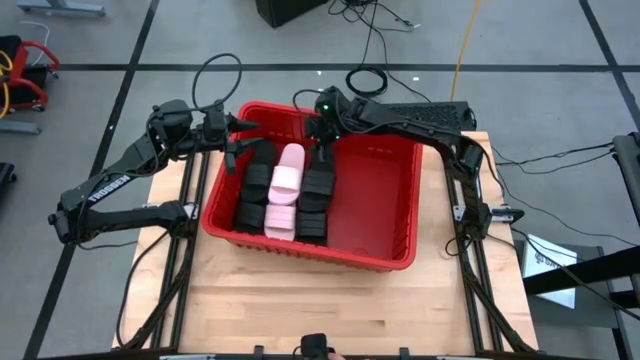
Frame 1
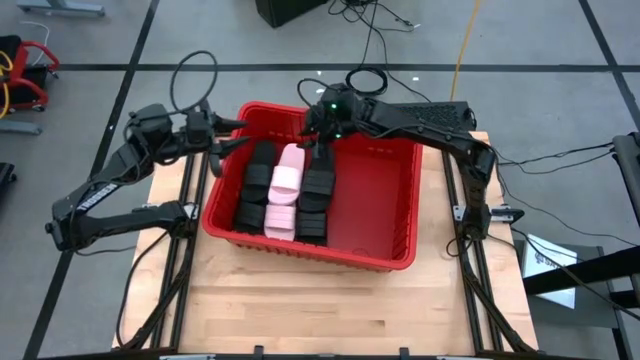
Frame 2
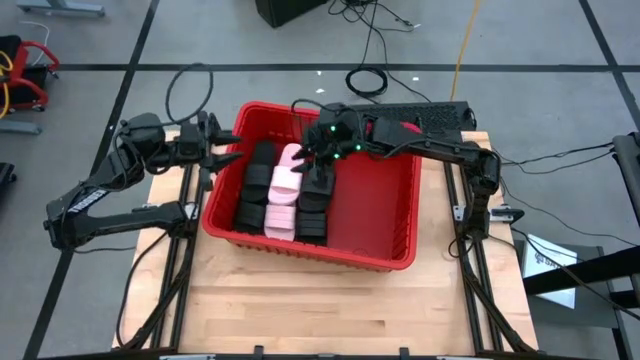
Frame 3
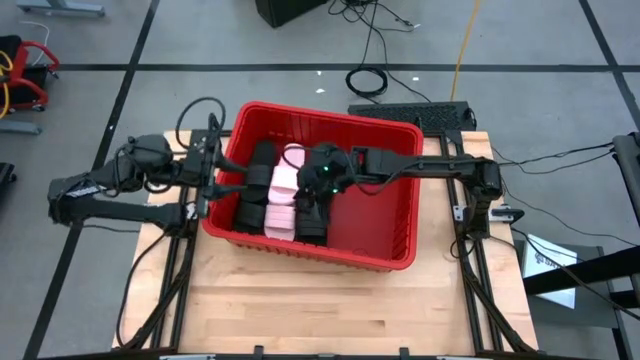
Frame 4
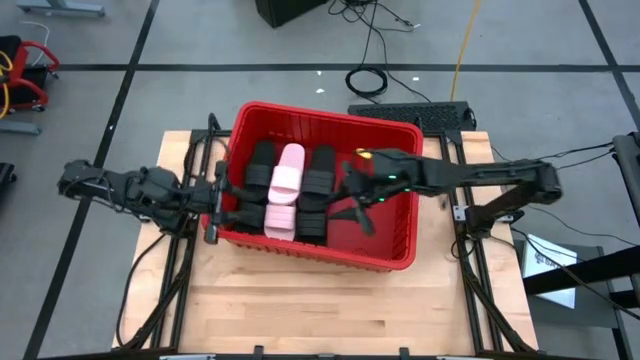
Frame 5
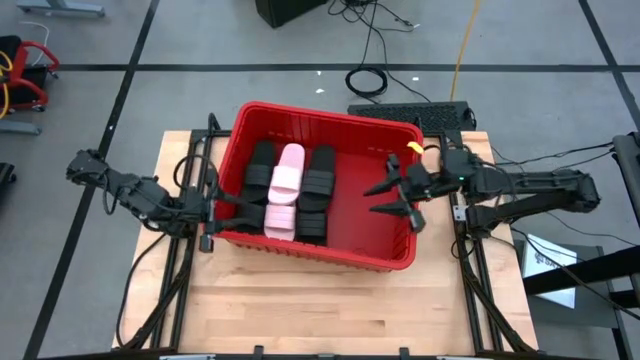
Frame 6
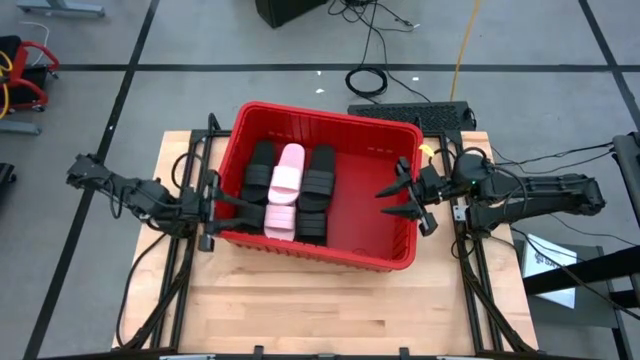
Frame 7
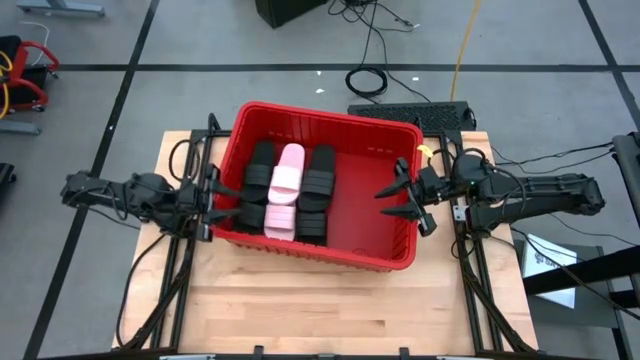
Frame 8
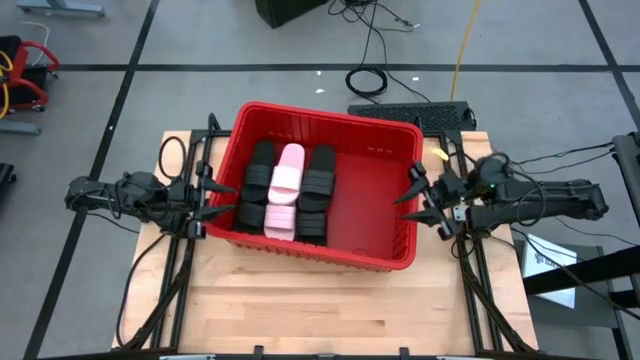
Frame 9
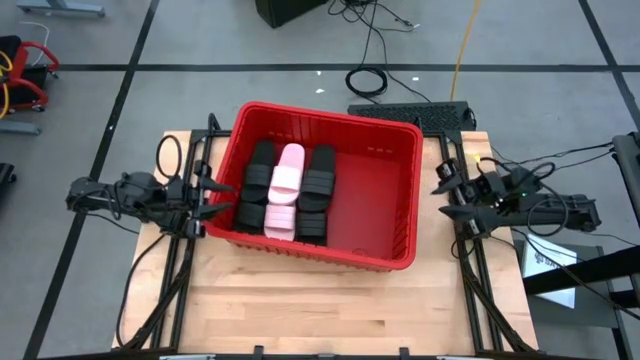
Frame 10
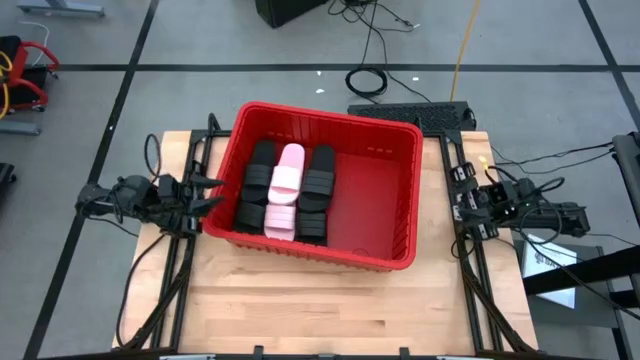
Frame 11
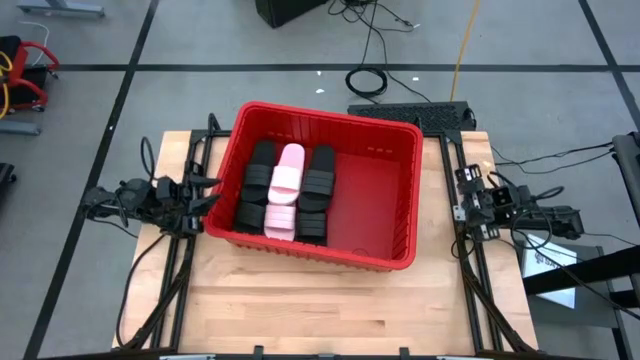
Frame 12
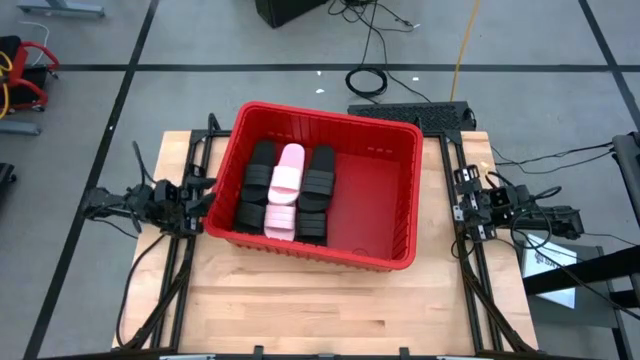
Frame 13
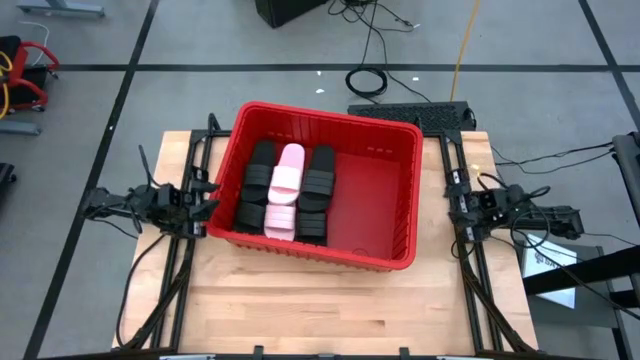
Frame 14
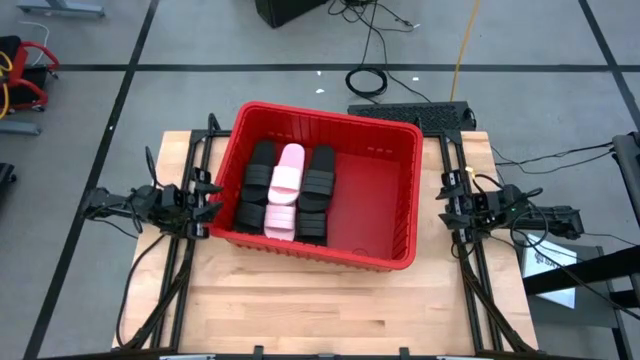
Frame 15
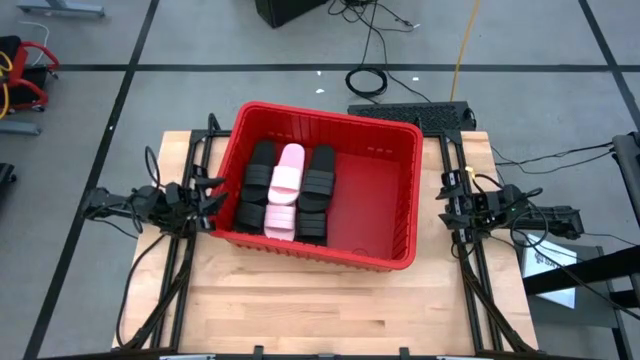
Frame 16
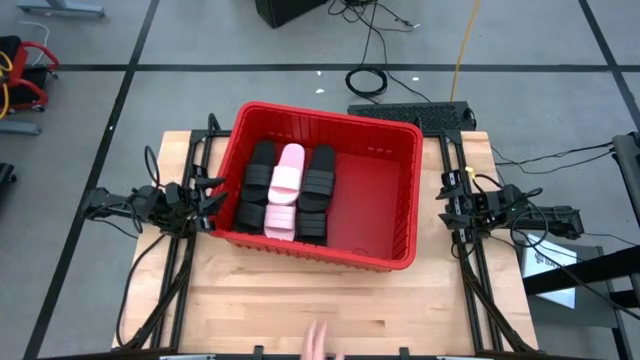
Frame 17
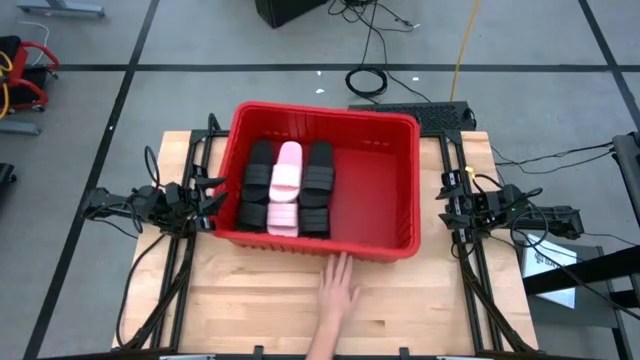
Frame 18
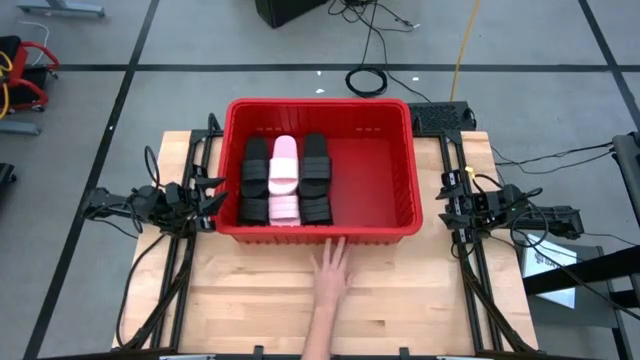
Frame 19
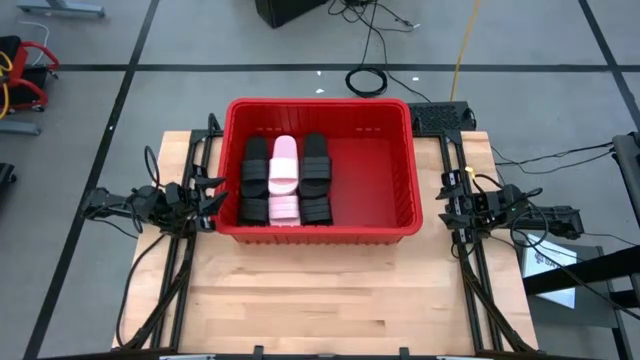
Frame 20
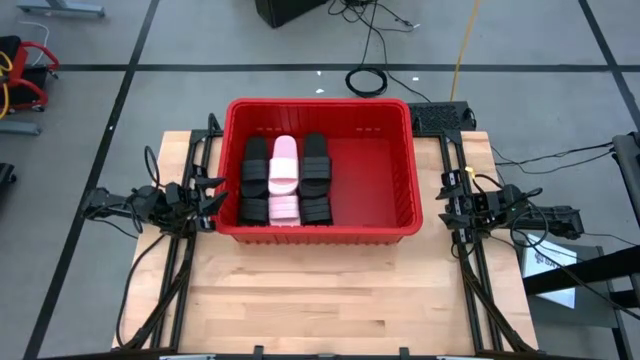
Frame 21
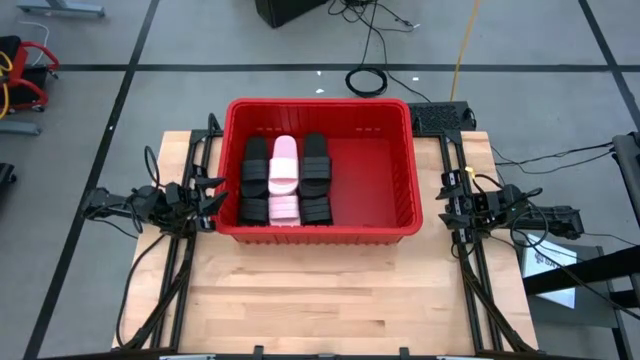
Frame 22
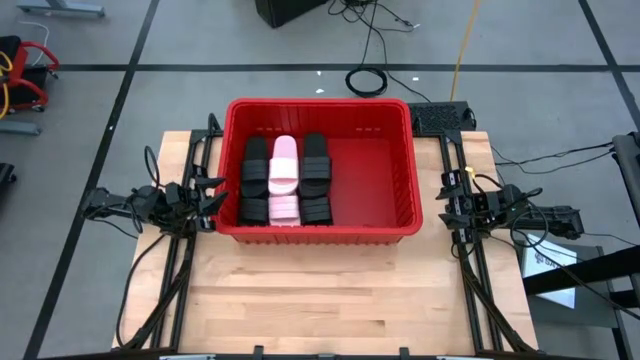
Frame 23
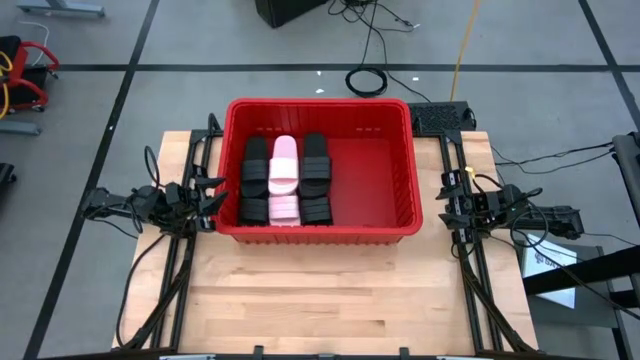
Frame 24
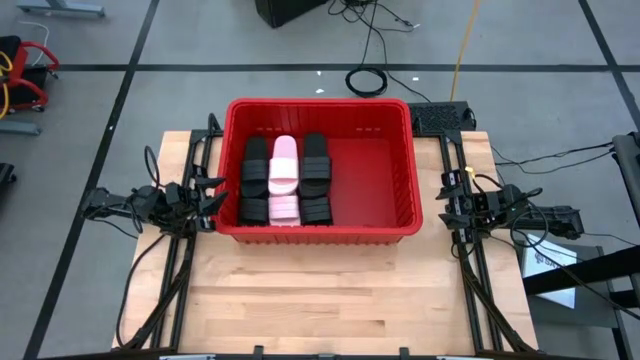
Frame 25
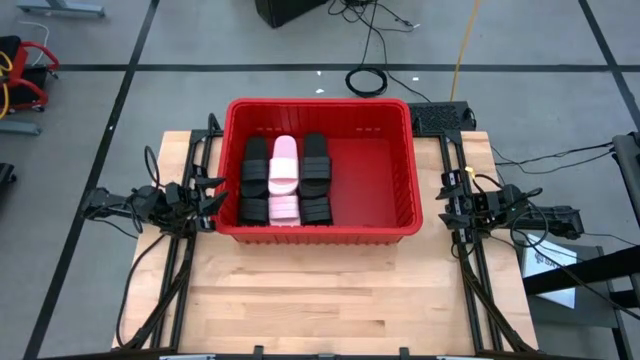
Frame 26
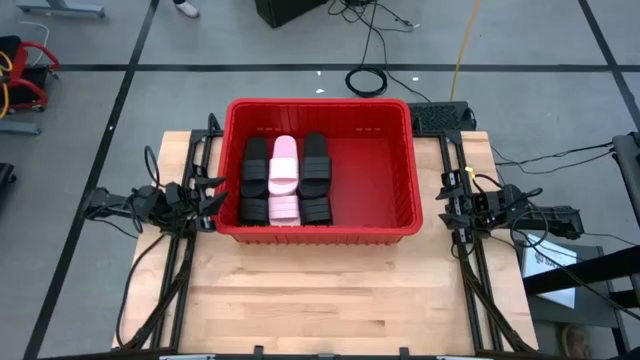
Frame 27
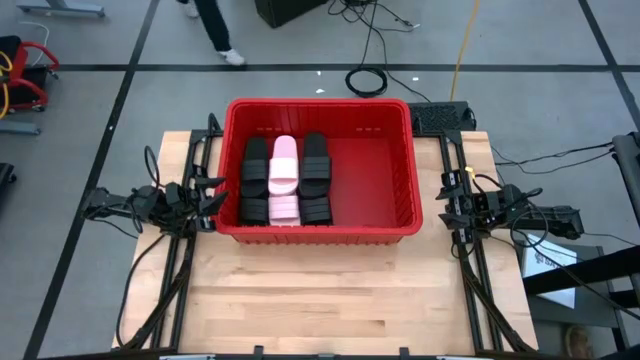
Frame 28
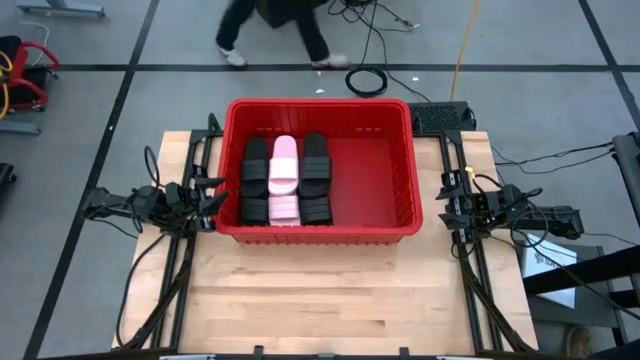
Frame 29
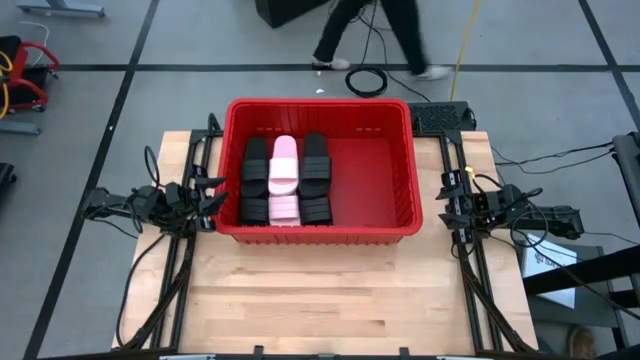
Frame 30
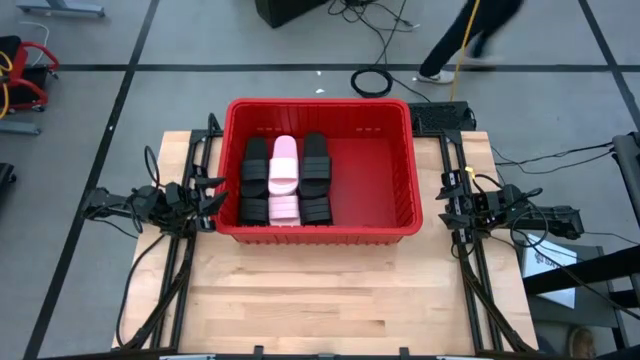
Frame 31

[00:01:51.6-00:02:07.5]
Task: Pick and place slides into bin
Return to Home Position

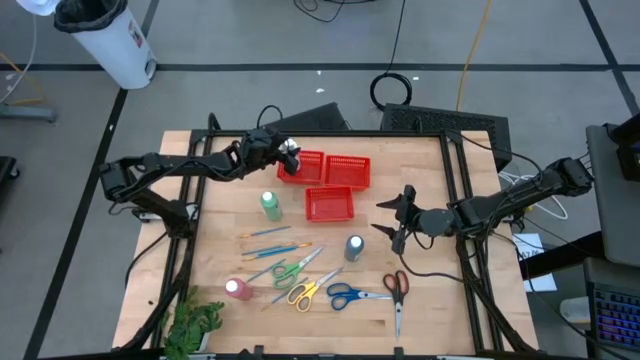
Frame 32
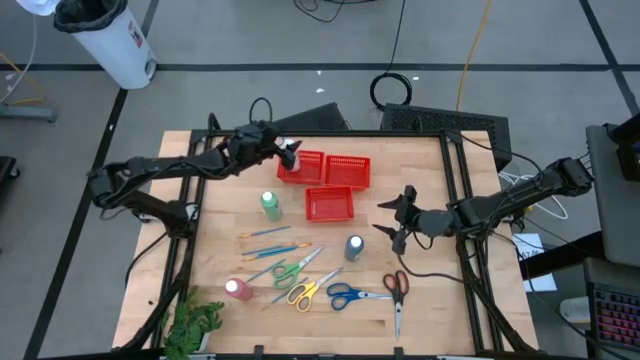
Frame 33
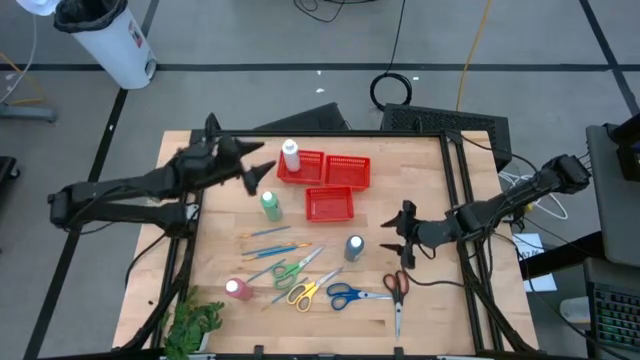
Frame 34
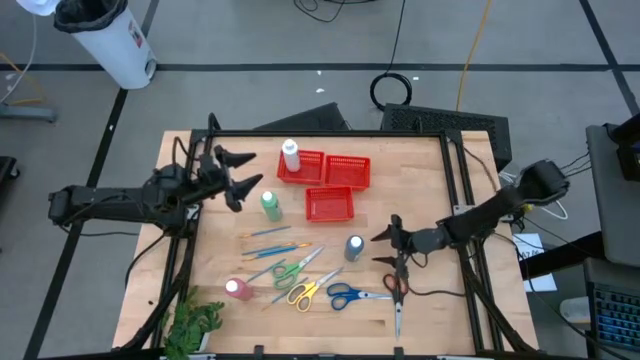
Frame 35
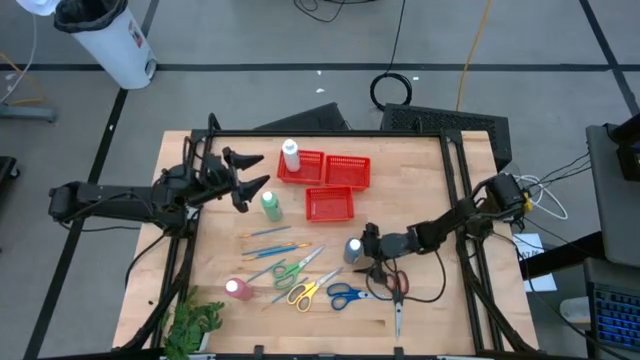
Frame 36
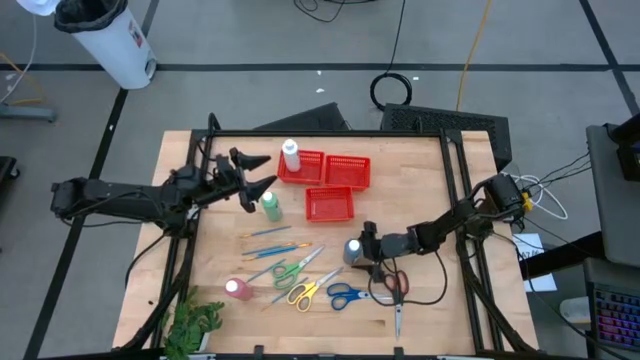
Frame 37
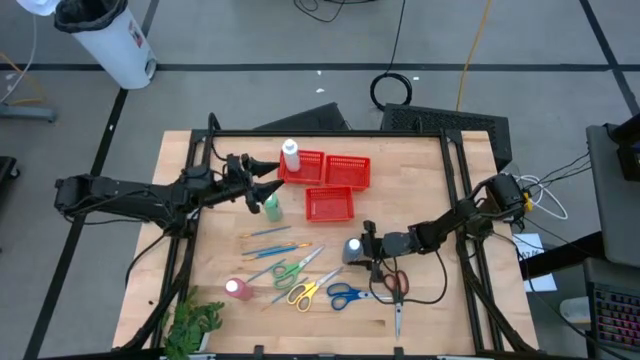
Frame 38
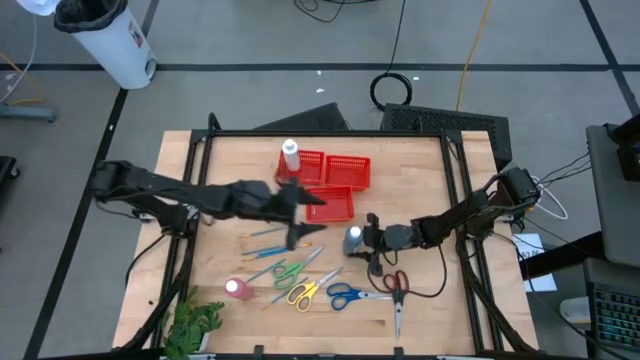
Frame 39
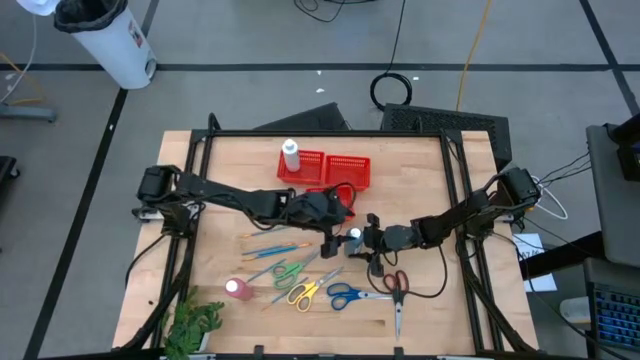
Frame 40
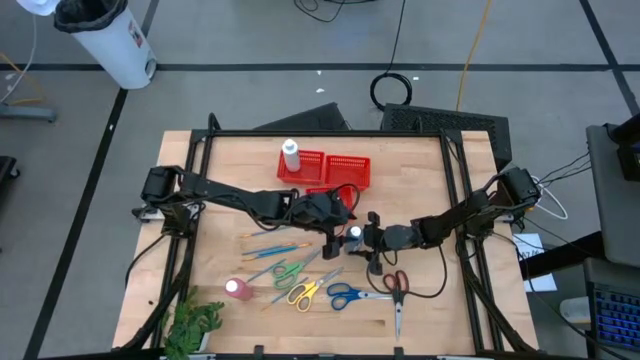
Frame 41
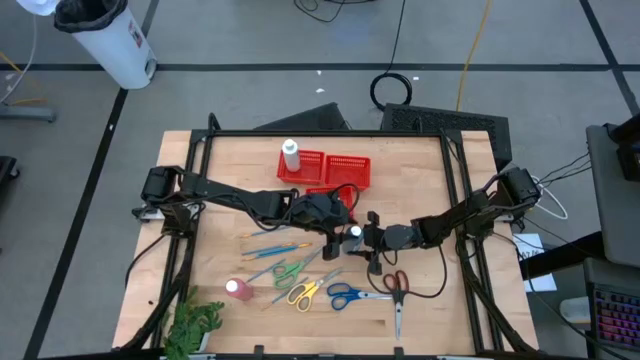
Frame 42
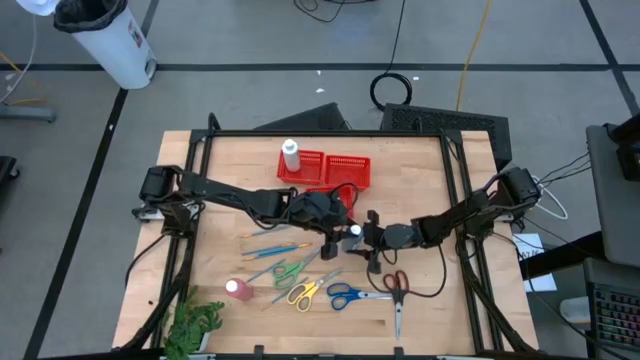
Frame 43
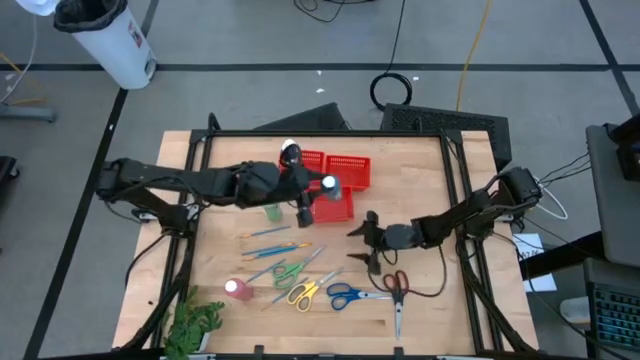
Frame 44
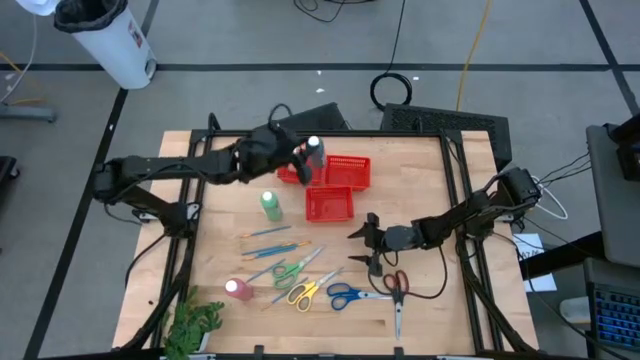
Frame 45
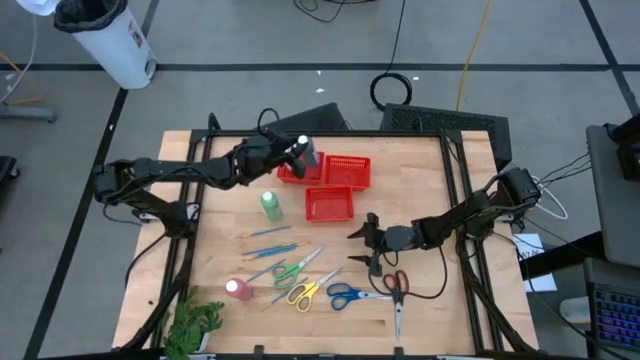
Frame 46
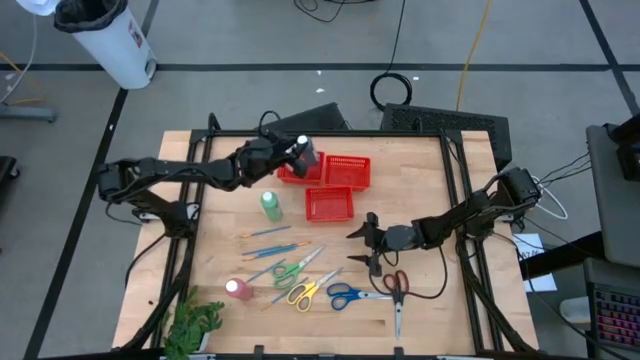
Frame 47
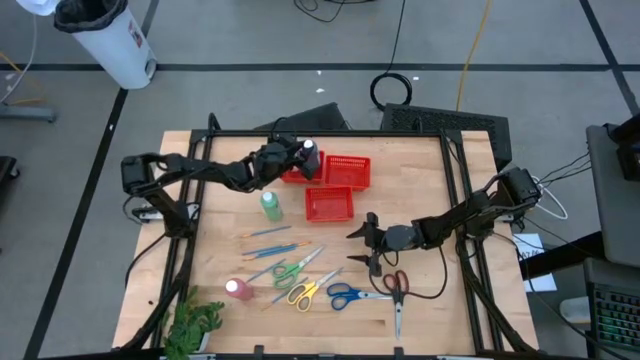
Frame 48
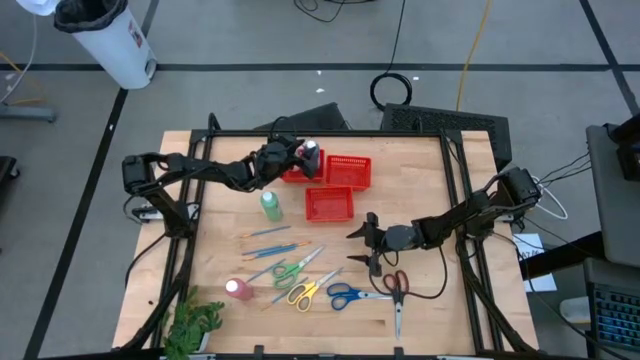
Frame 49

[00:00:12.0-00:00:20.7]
Task: Pick & Place Paint Supplies
Put the black paint bottle into the top left red bin
